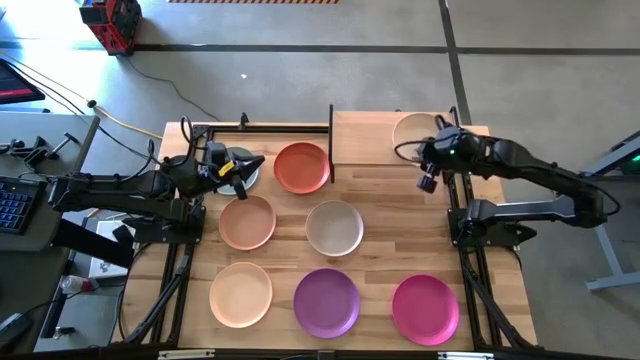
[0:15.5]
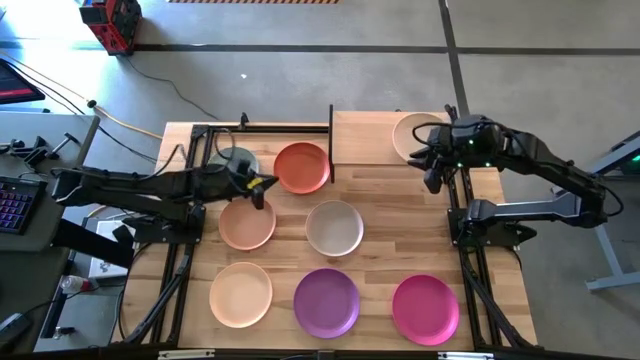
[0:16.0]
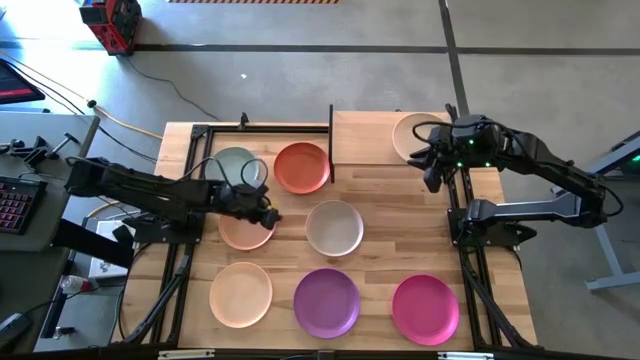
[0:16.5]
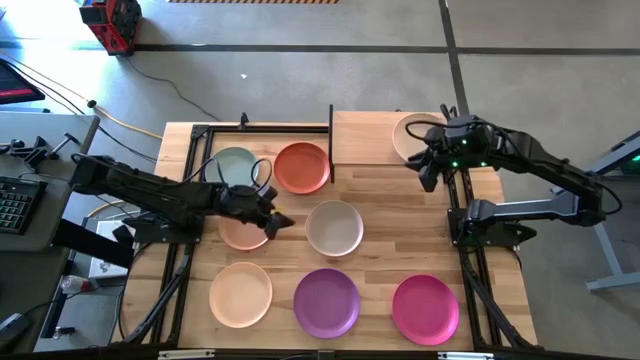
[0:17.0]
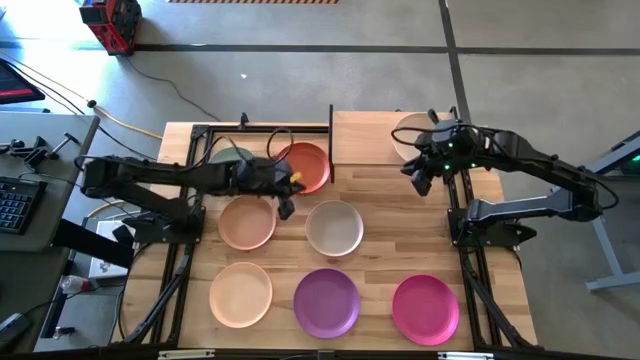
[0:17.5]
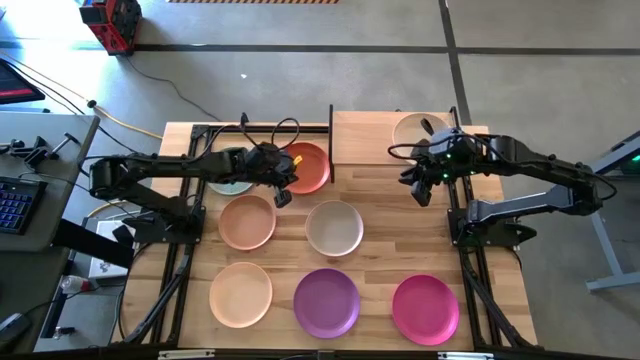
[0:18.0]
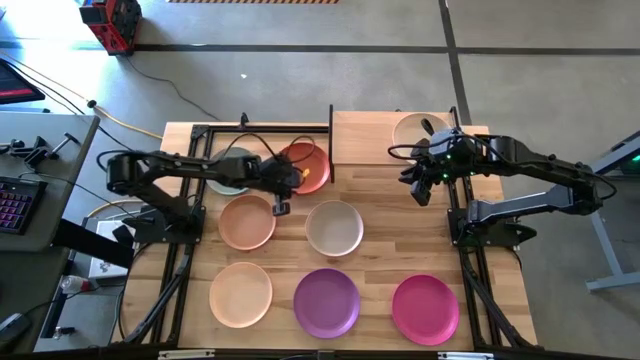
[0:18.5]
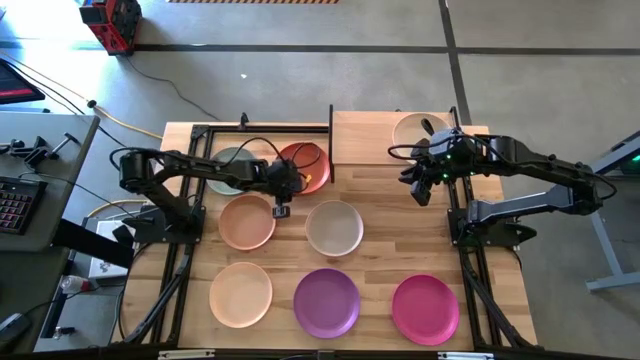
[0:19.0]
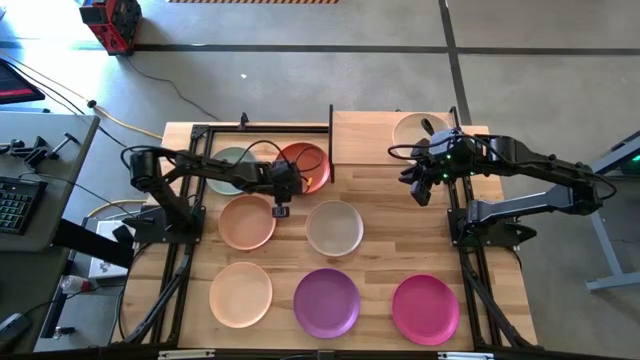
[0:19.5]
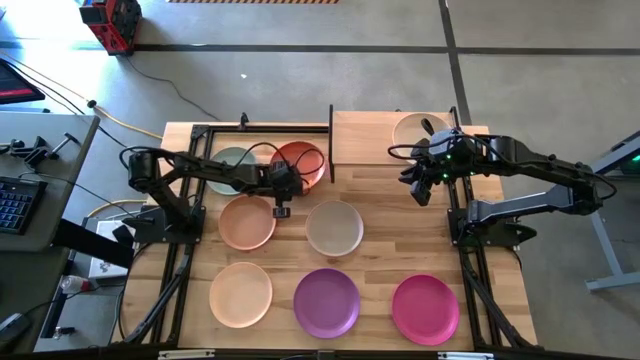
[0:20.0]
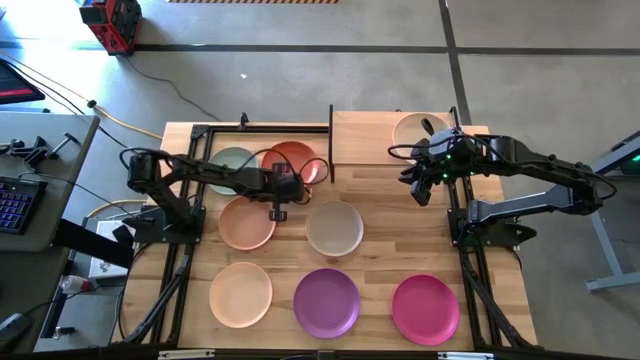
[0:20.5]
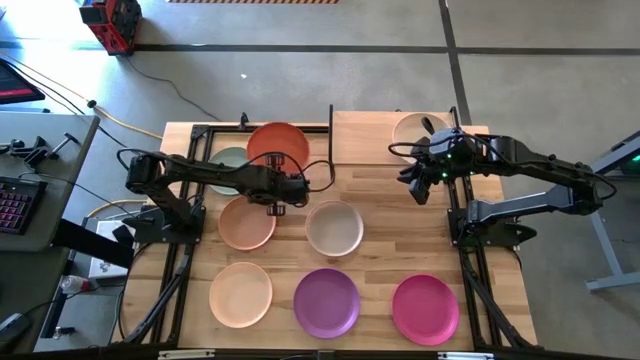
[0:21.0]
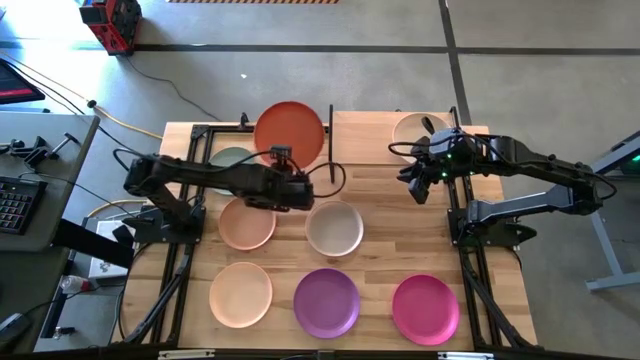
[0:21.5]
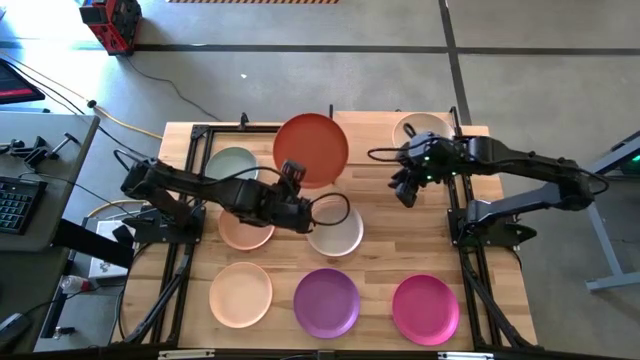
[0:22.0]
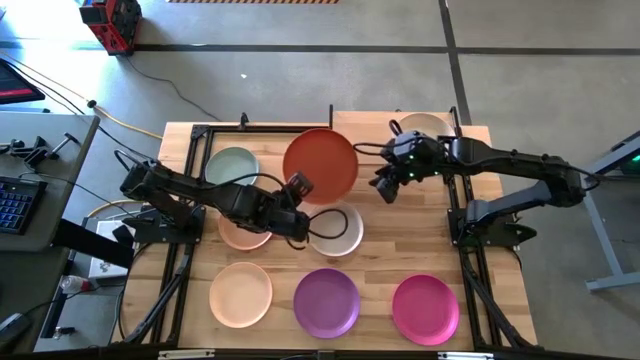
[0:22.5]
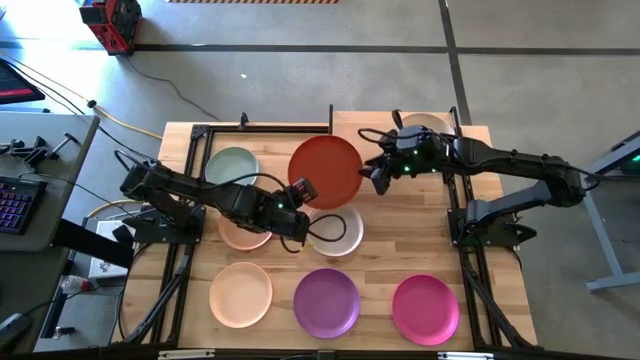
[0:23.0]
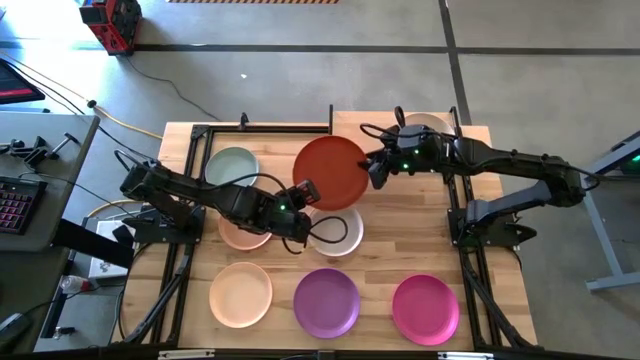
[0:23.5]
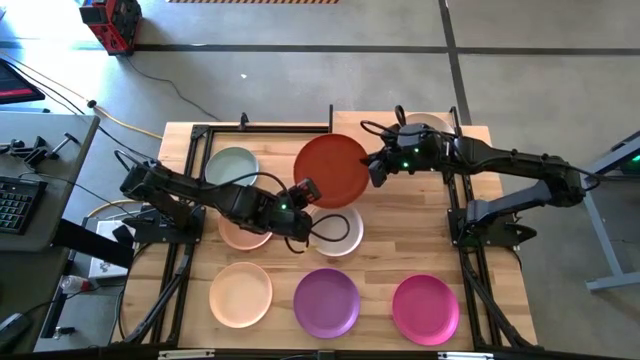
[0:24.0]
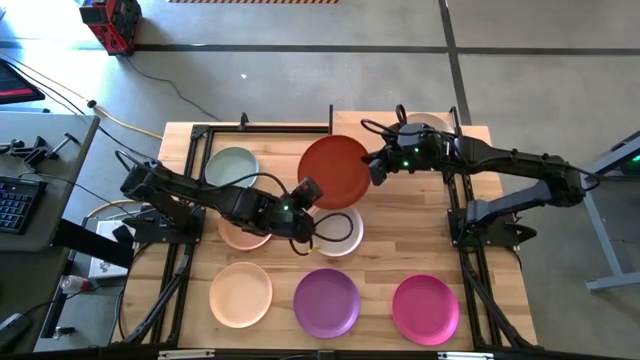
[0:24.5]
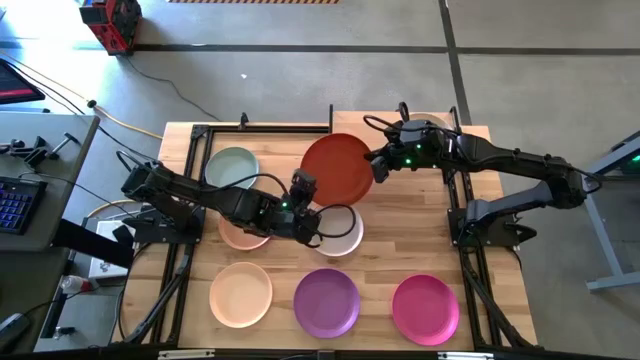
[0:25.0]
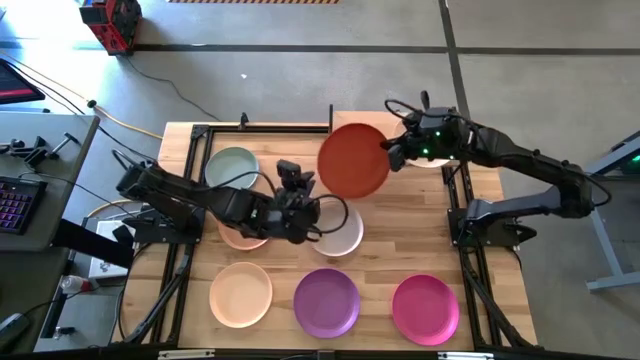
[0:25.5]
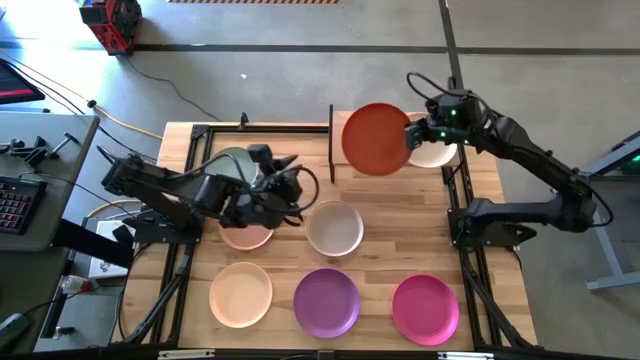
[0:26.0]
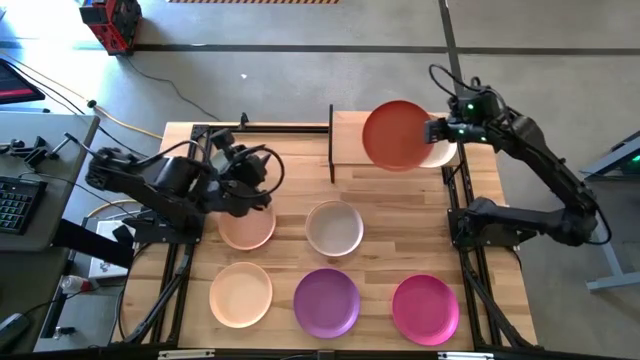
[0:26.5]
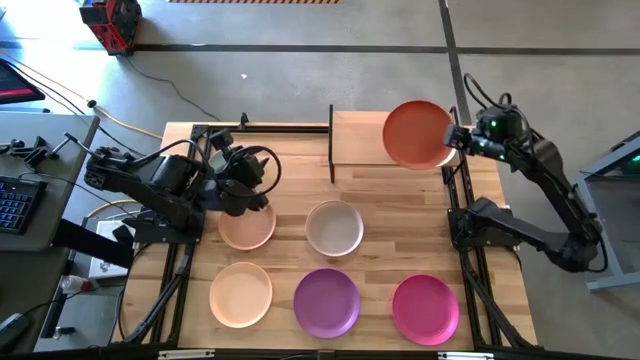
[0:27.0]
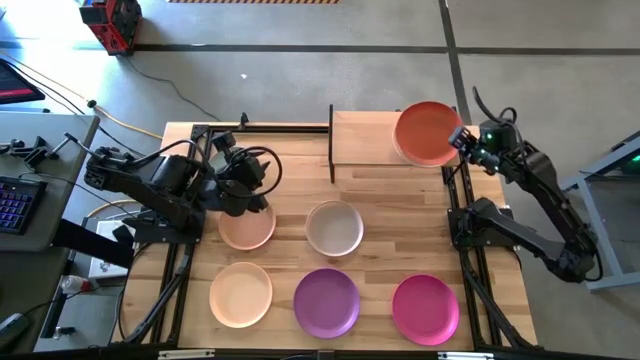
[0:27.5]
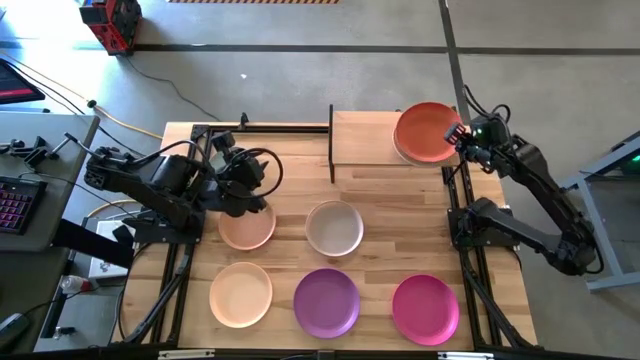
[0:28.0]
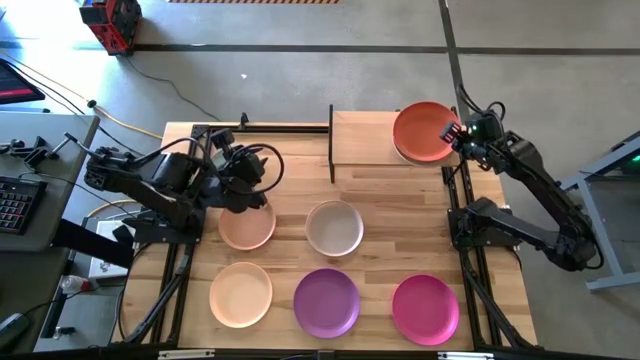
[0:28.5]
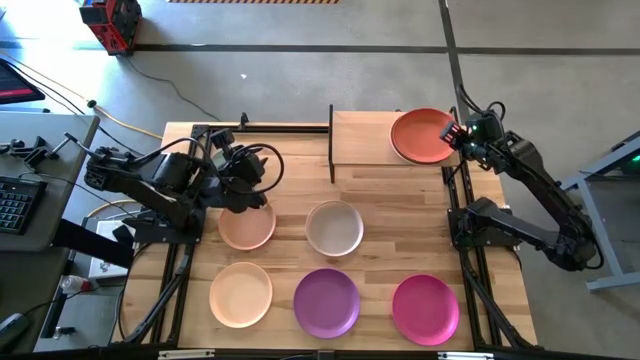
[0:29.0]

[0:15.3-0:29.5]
Task: Place and stack plates onto a shelf
Stack the orange plate on top of the white plate on the shelf

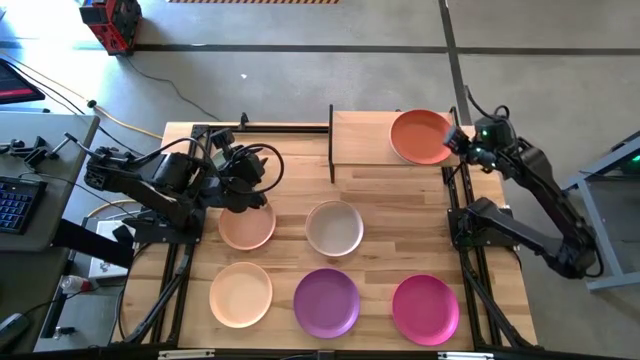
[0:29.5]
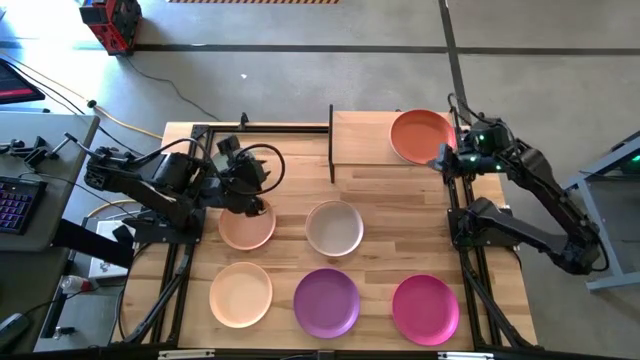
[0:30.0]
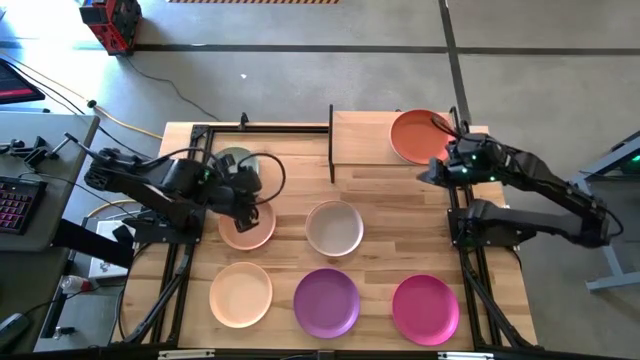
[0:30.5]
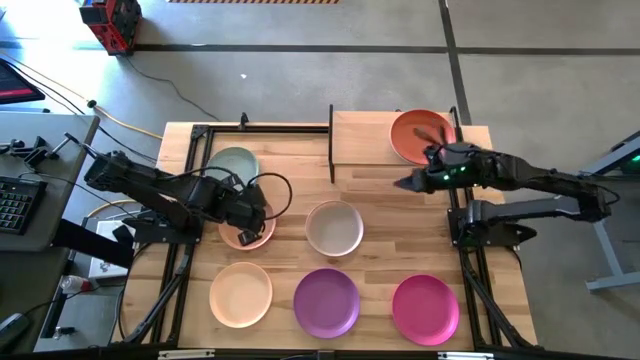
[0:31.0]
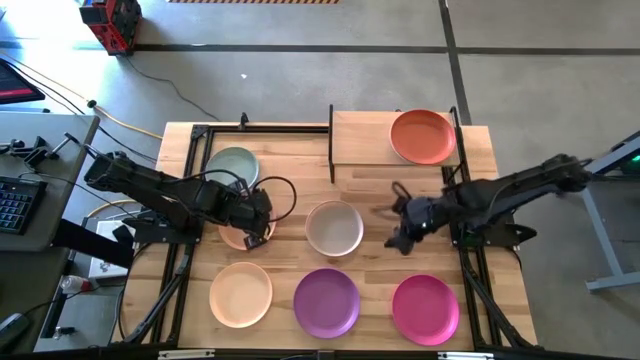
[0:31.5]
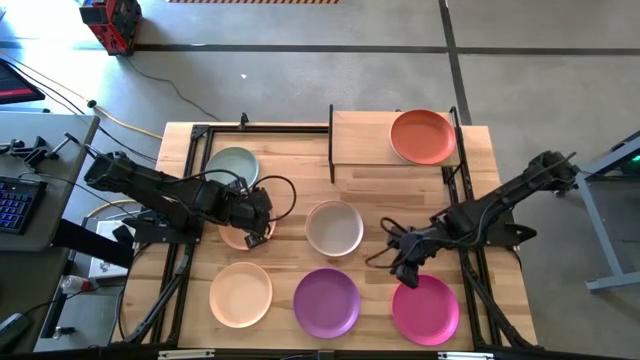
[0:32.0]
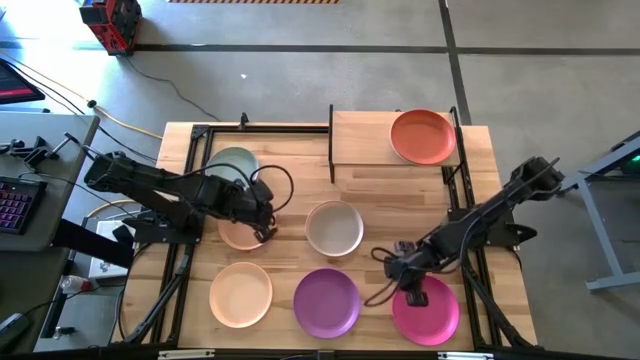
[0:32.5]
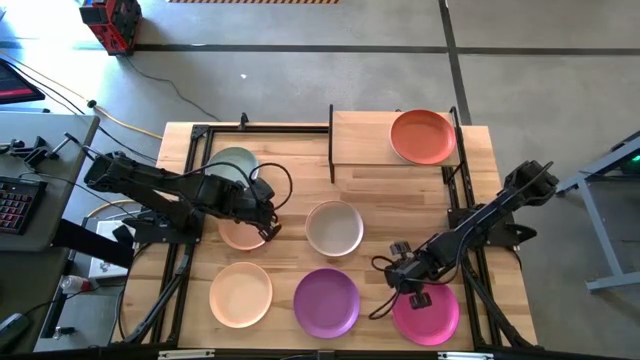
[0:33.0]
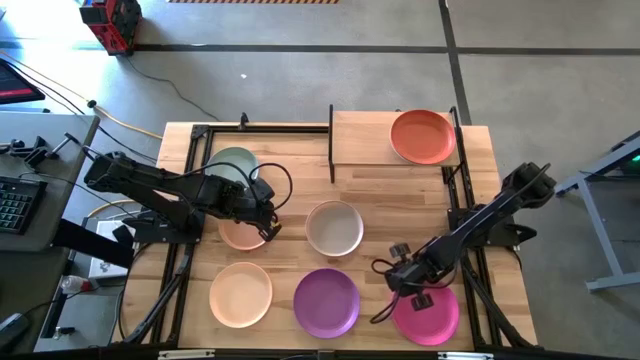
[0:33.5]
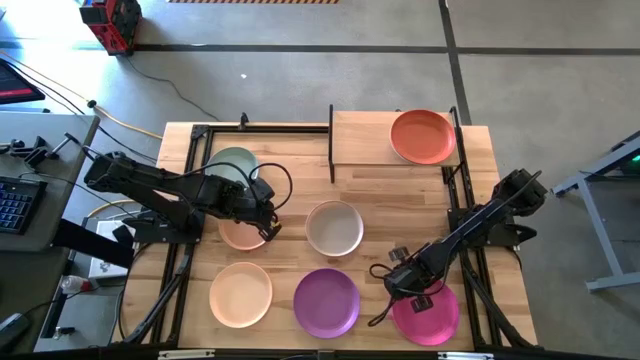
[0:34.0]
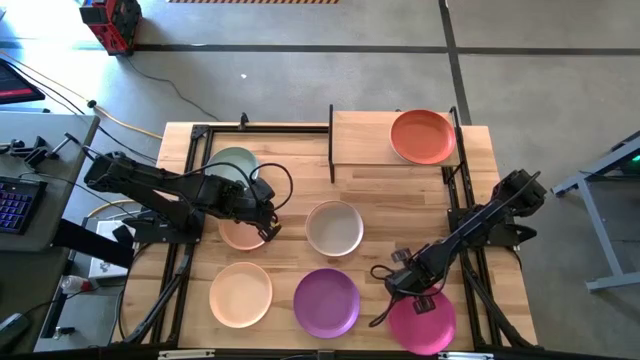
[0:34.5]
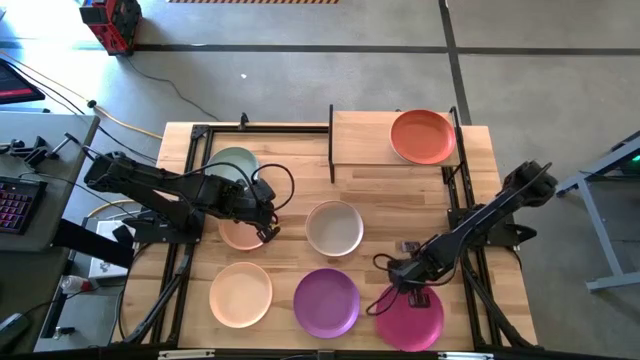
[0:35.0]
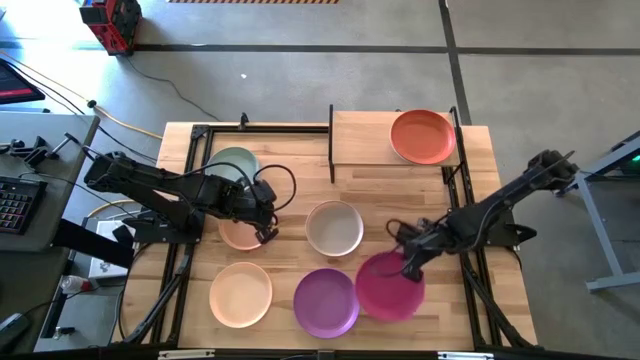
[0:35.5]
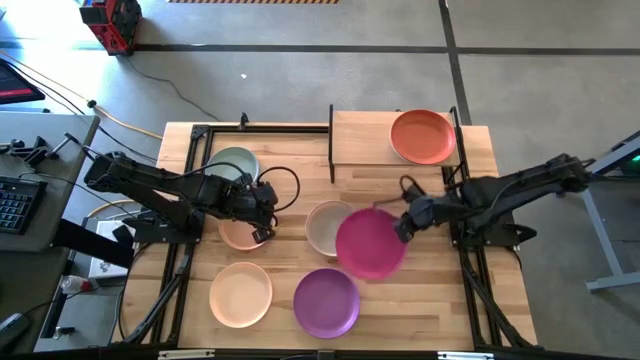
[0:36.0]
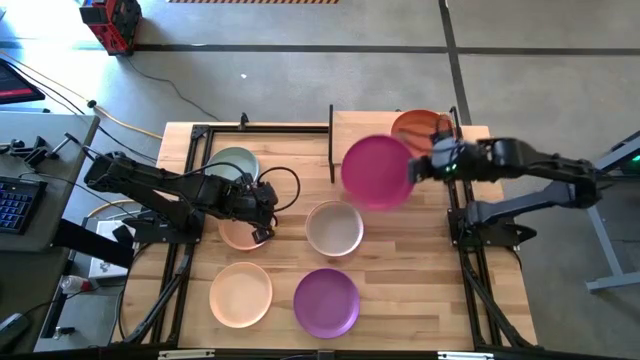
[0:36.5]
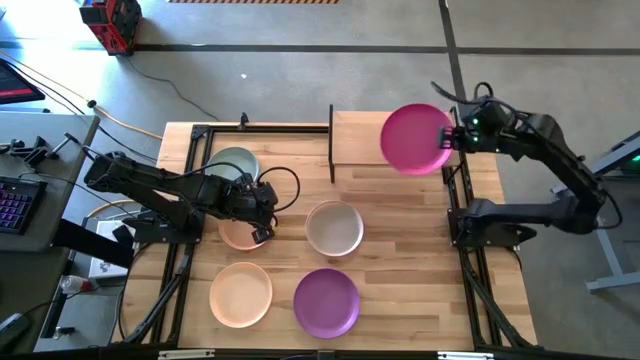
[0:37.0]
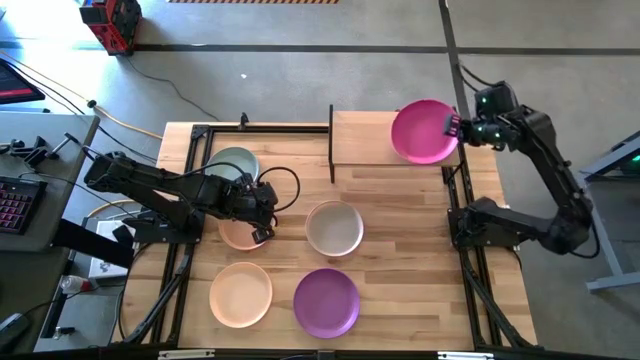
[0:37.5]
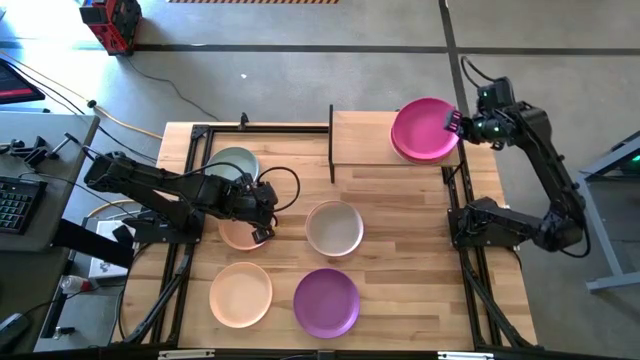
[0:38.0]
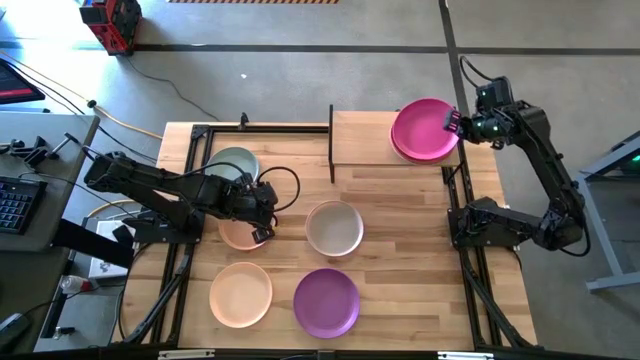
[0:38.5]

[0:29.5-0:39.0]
Stack the pink plate on top of the orange plate on the shelf
